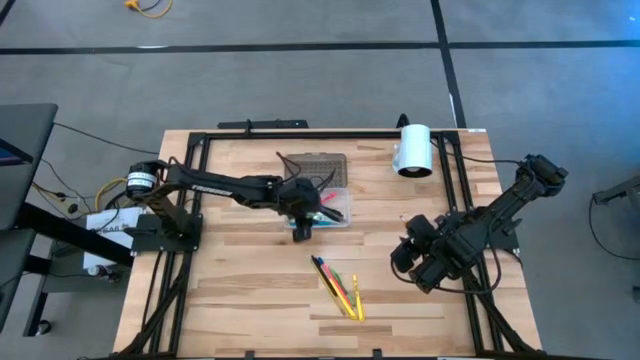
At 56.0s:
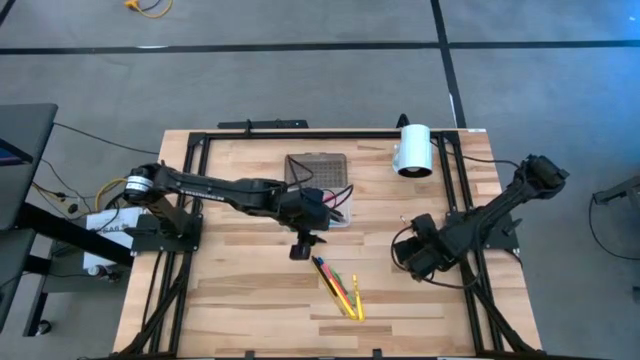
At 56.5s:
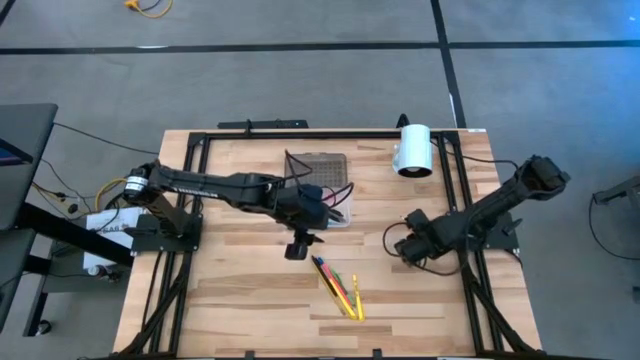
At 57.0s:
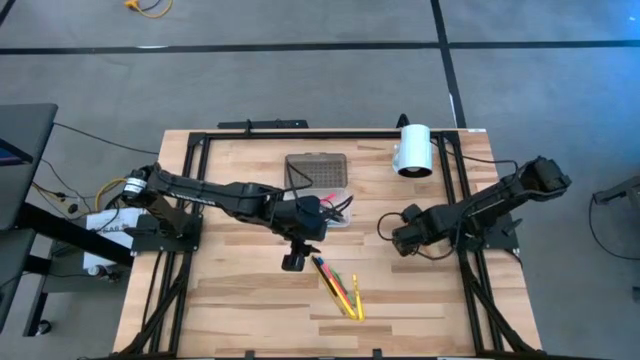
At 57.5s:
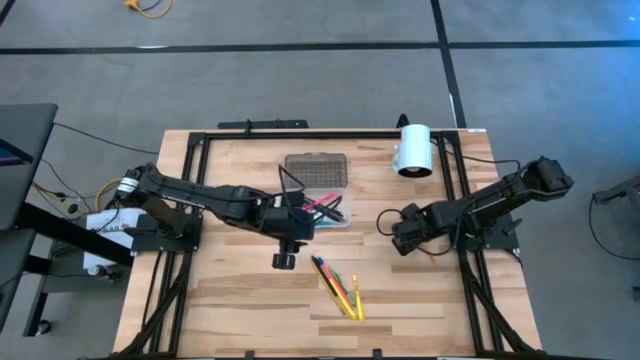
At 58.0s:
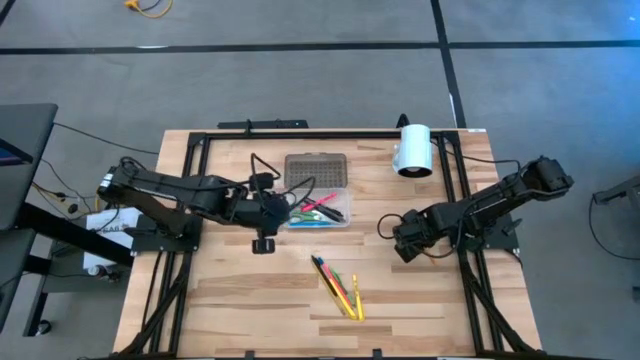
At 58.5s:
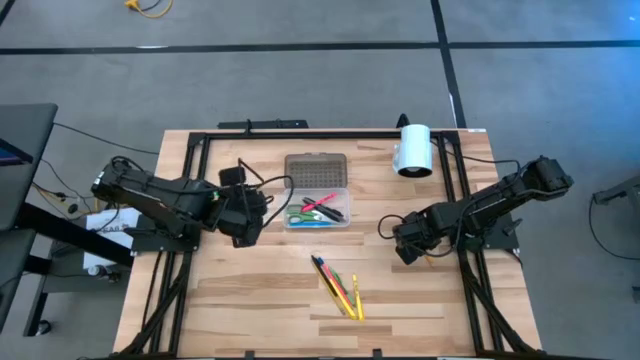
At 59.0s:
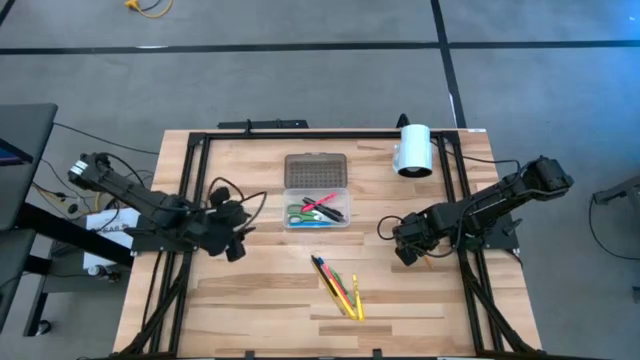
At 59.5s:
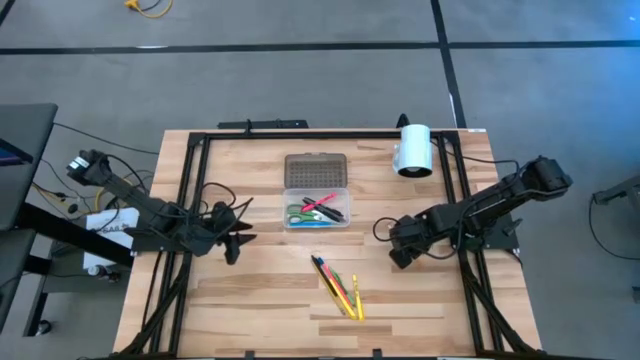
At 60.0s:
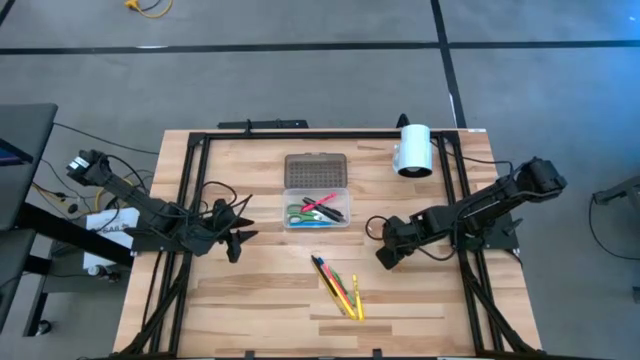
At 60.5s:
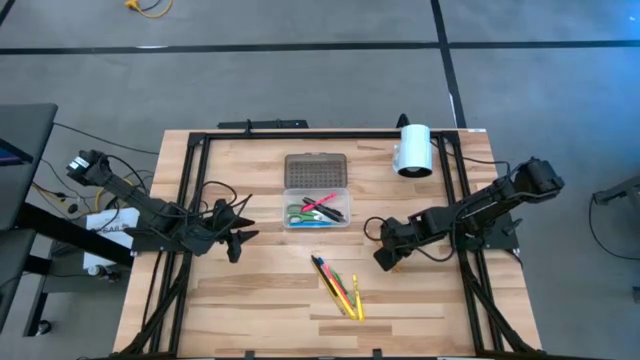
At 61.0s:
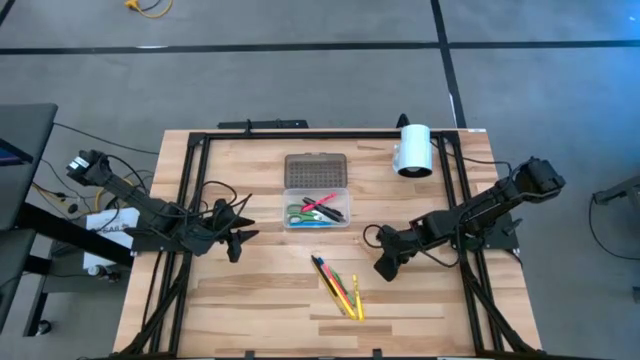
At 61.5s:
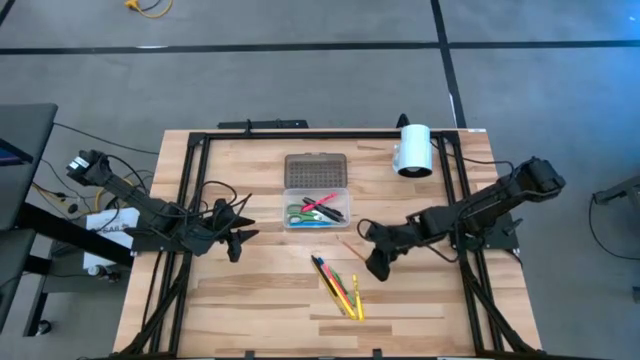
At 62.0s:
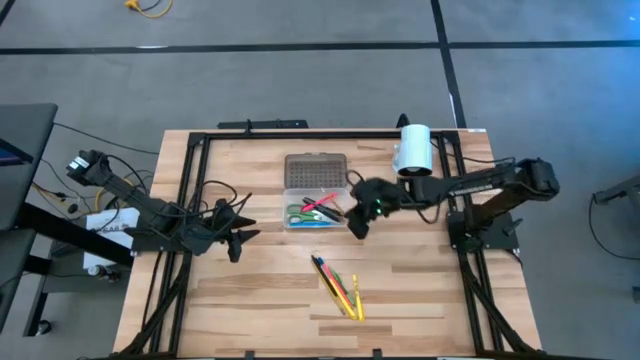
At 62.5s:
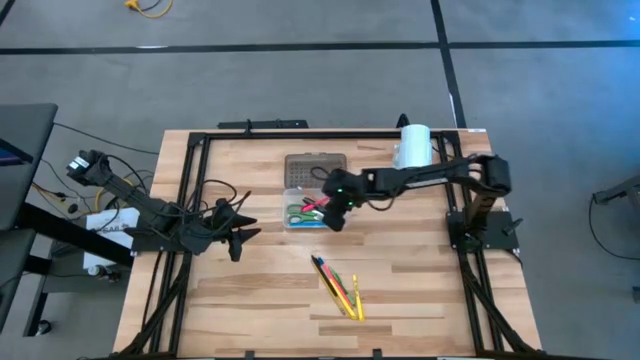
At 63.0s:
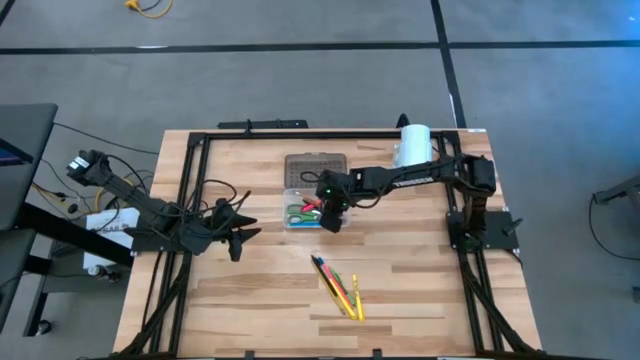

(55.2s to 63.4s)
Task: Pick & place school supplies into a supply box
Put the orange pencil into the supply box

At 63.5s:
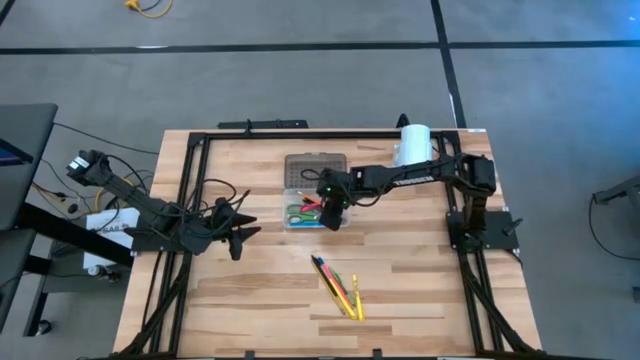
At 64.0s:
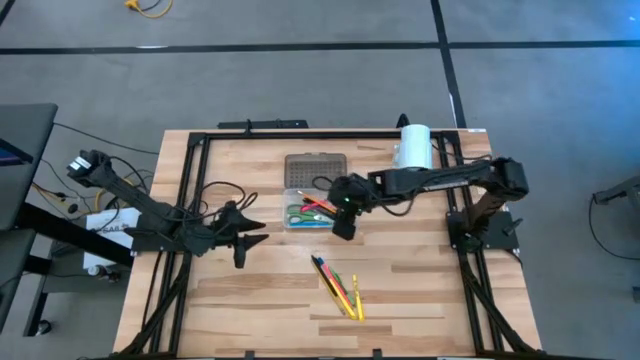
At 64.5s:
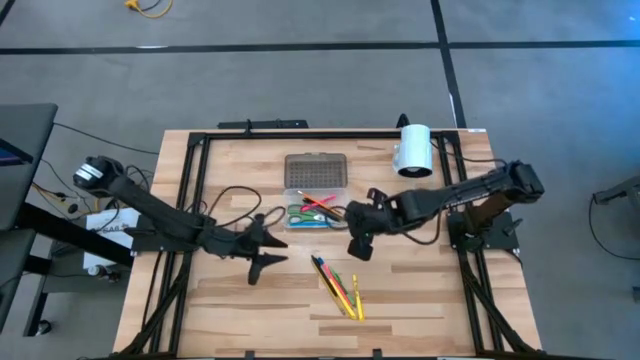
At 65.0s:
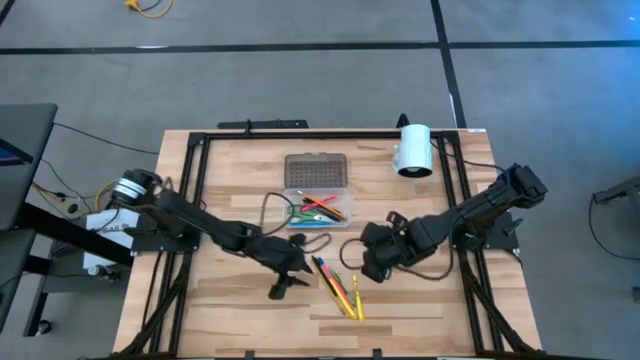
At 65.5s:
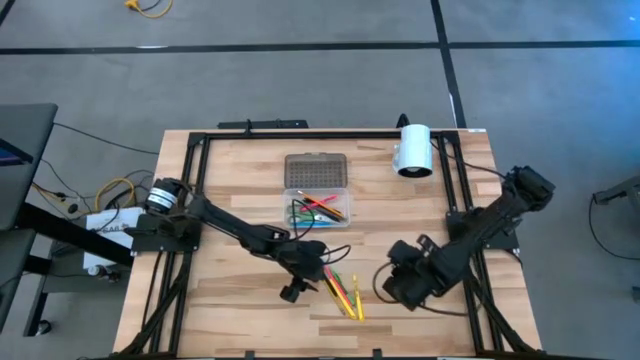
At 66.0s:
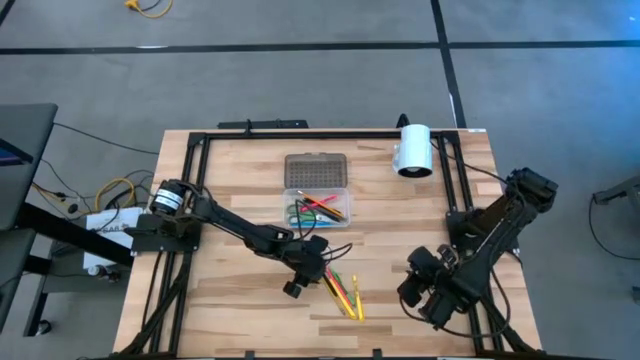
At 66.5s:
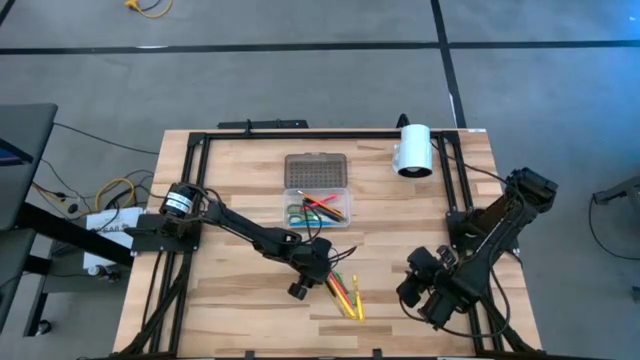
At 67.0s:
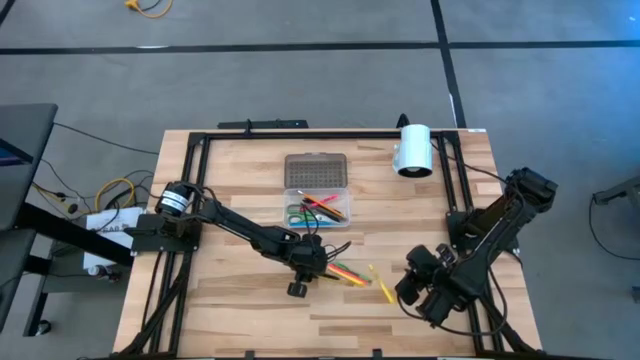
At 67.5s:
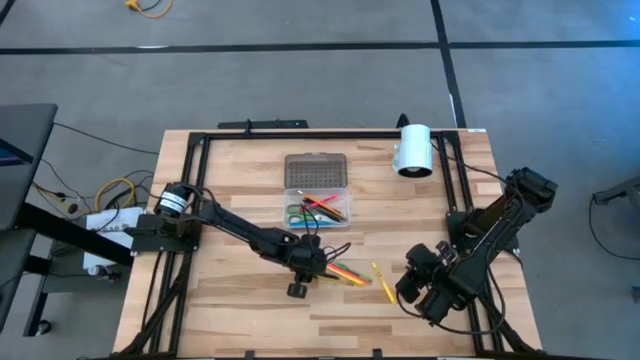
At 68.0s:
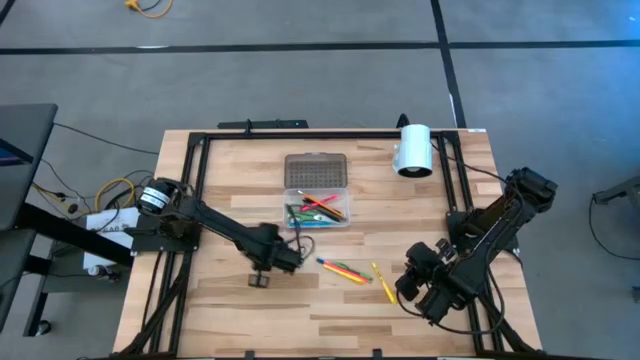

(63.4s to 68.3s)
Put the black pen into the supply box

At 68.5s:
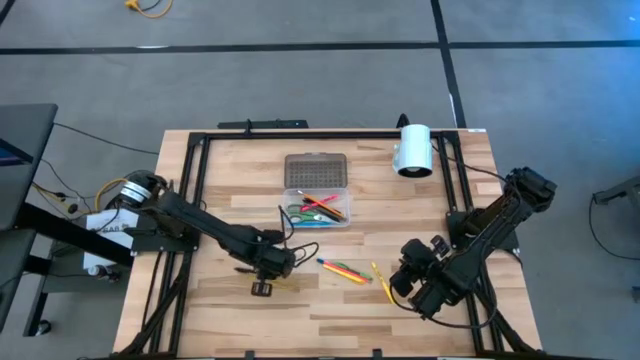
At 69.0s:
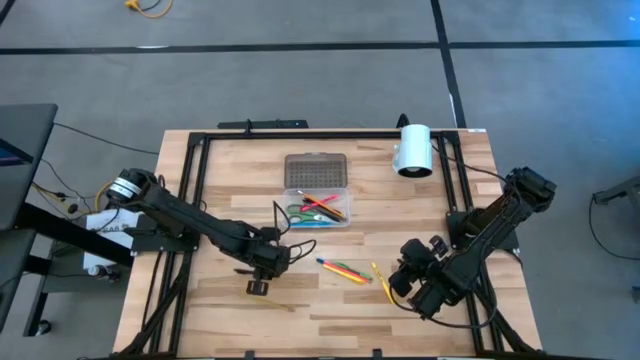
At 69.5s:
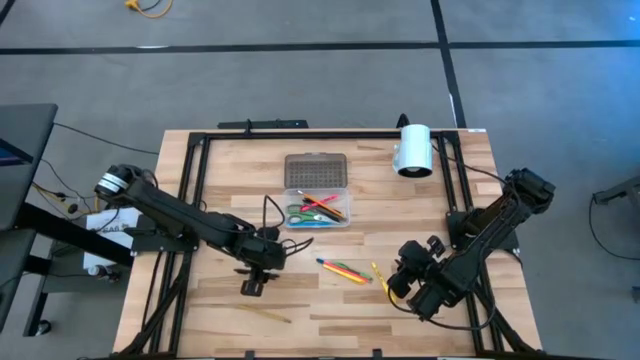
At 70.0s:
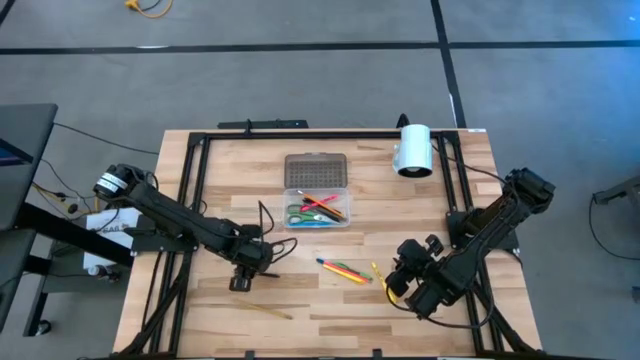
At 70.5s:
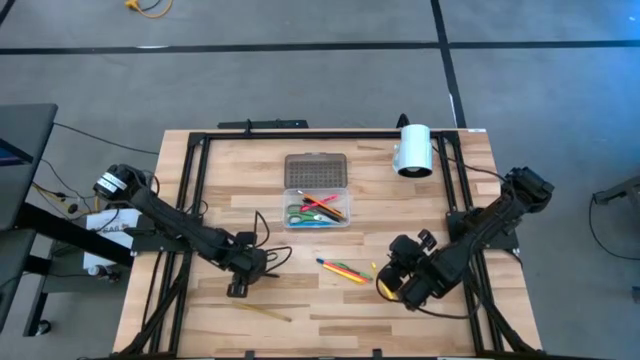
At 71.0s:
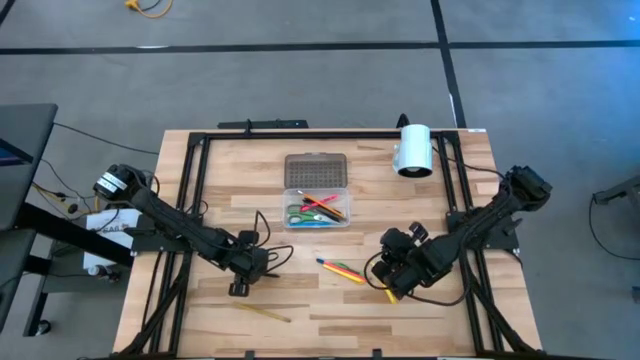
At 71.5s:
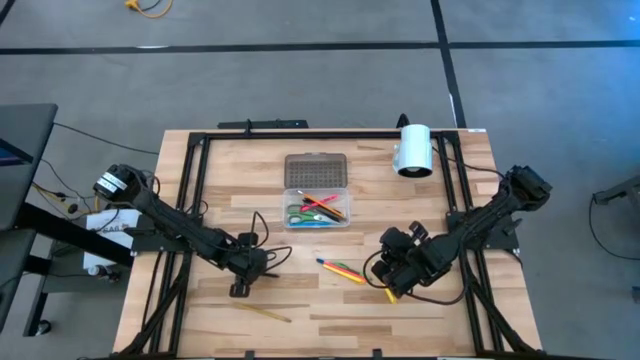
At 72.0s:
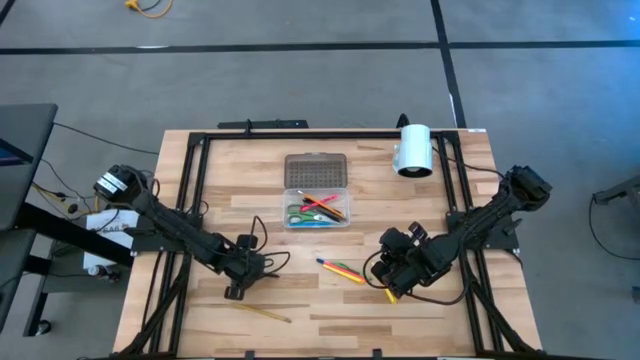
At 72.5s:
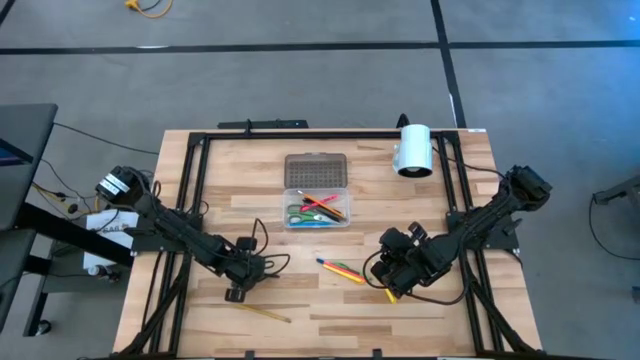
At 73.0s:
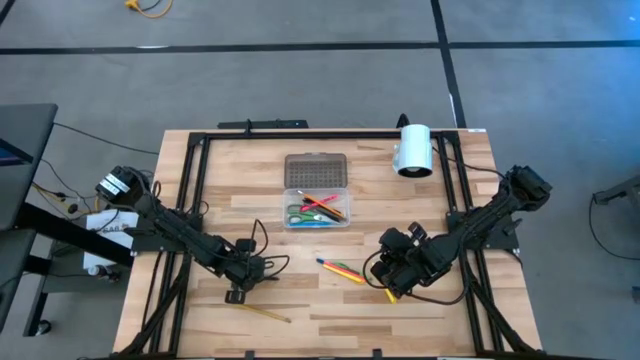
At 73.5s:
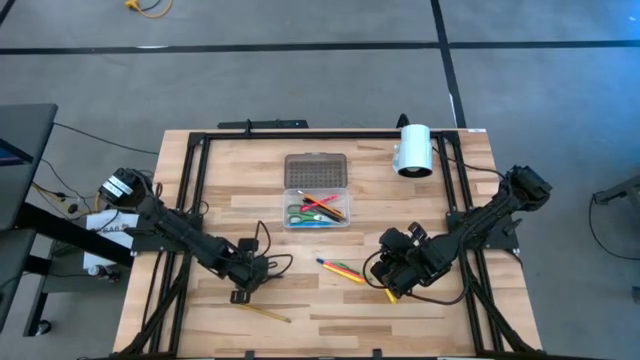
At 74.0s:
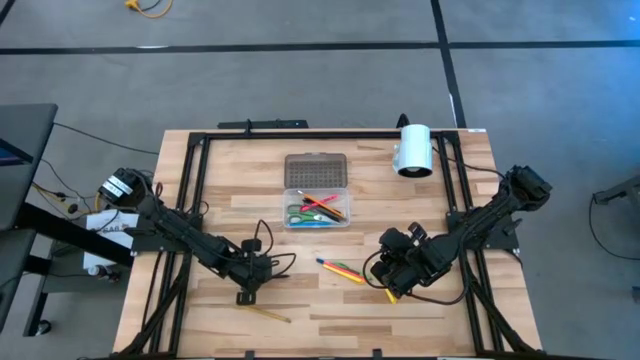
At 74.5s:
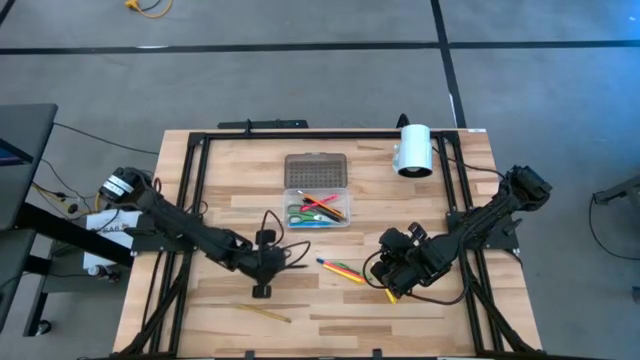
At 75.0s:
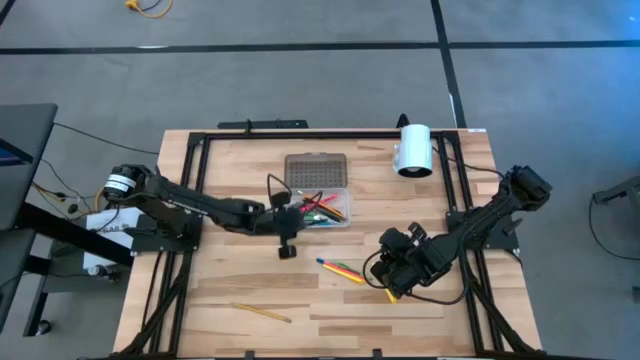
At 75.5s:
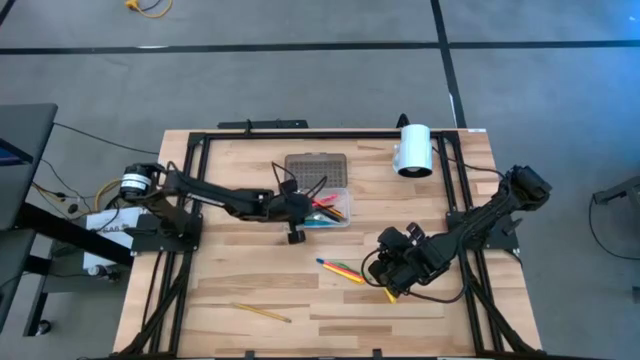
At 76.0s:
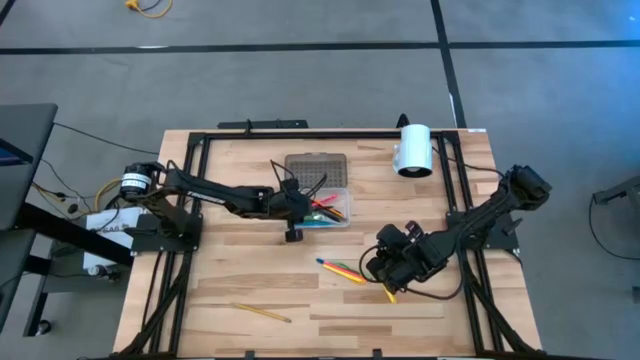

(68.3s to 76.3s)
Put the black pen into the supply box

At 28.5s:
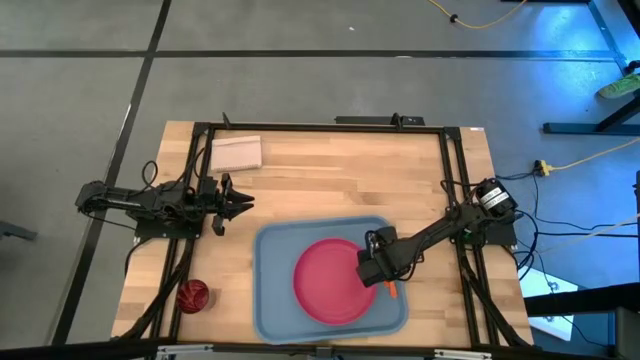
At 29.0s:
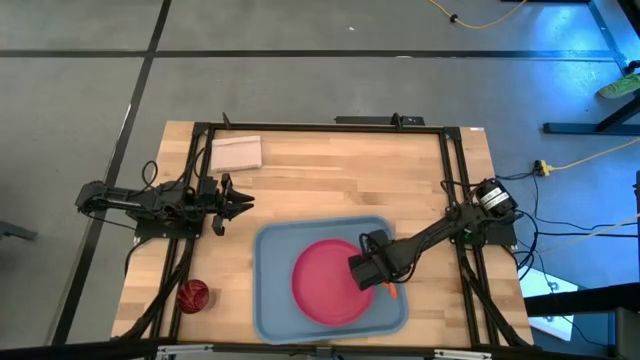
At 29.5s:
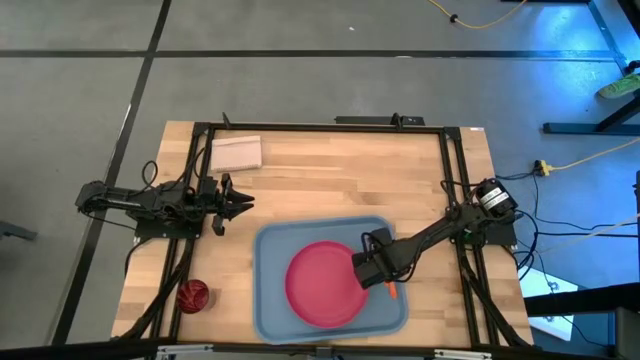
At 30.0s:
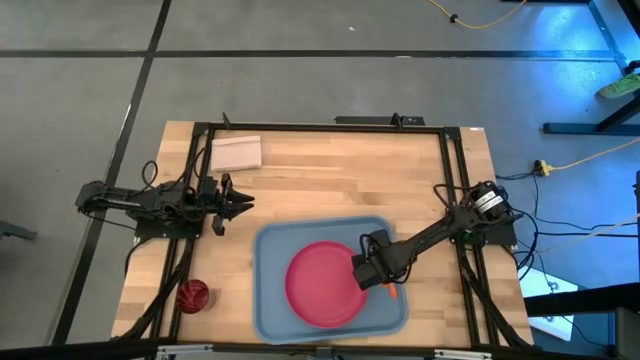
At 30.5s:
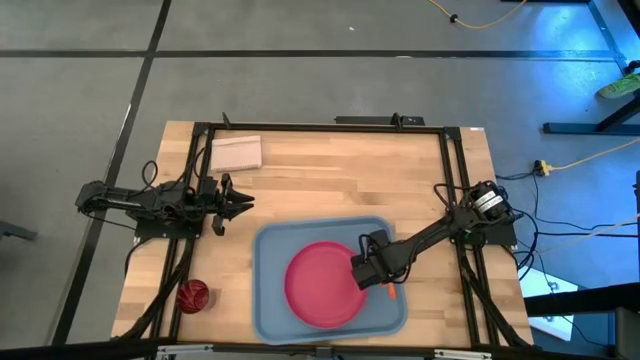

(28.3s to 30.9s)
Task: Pick and place plate/cup/fork/spoon on tray
Adjust the orange spoon on the blue tray
